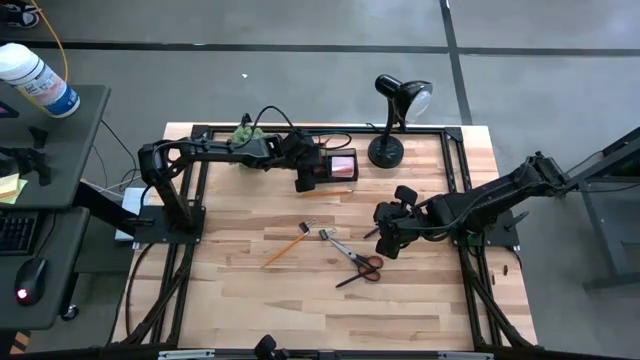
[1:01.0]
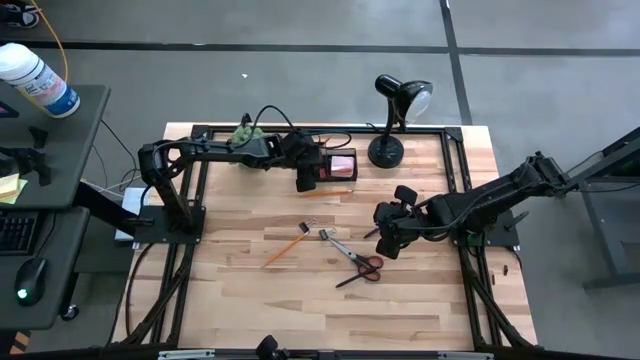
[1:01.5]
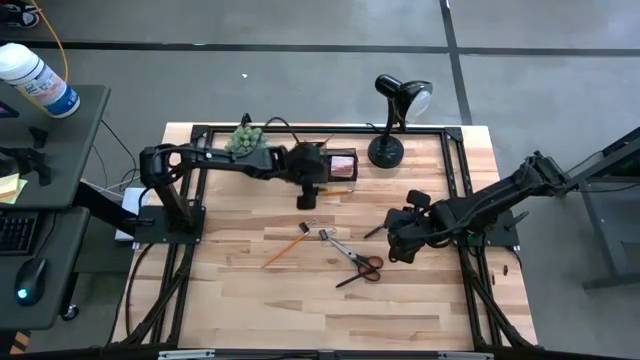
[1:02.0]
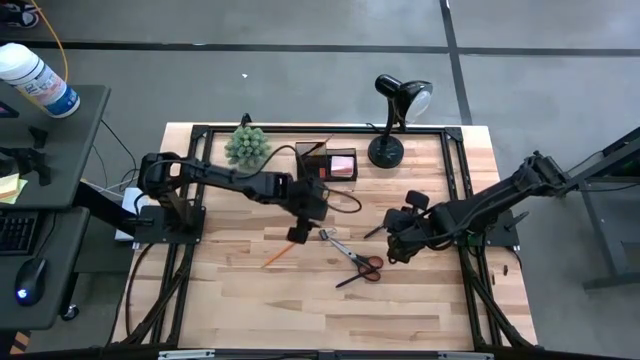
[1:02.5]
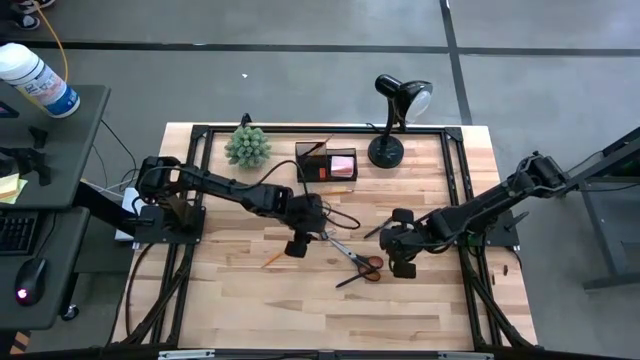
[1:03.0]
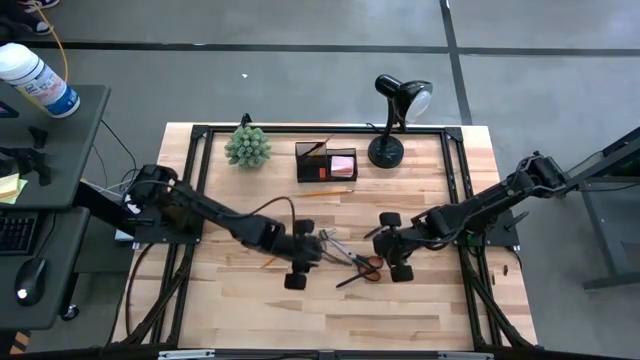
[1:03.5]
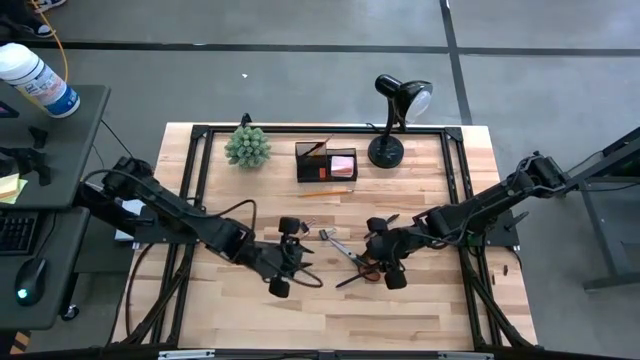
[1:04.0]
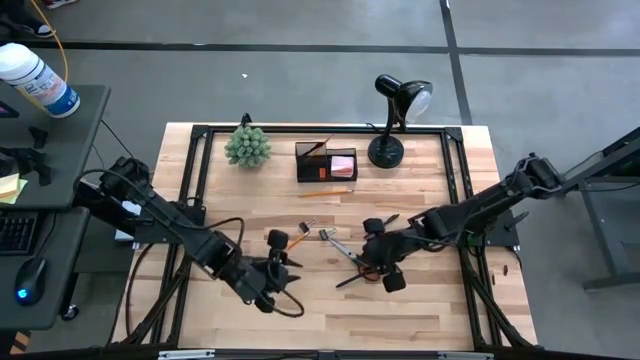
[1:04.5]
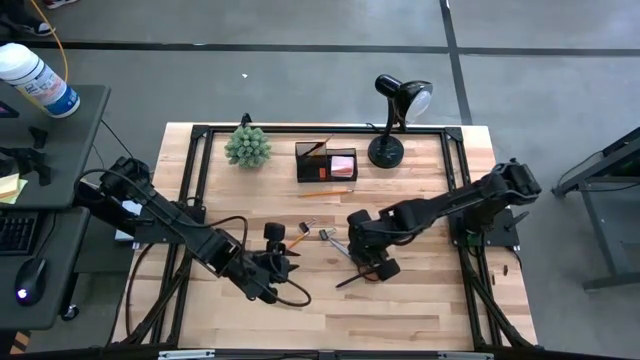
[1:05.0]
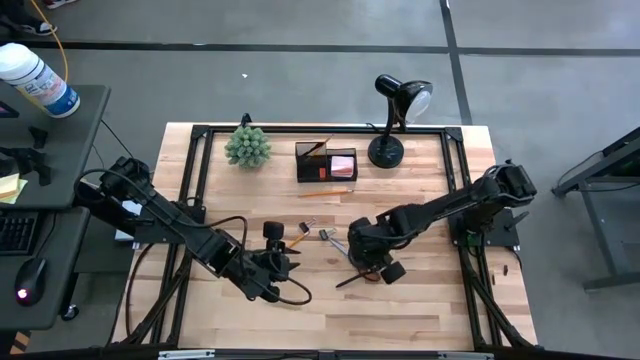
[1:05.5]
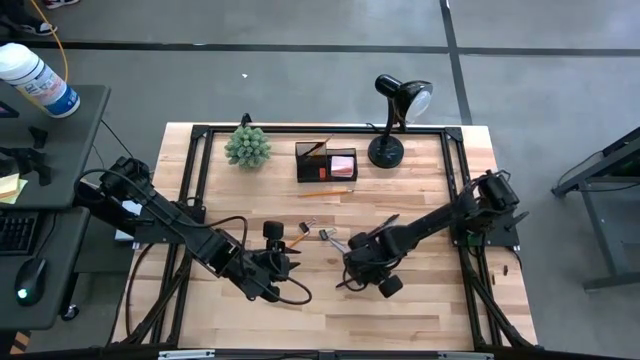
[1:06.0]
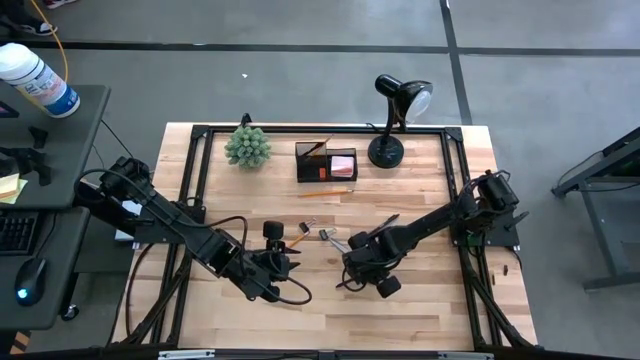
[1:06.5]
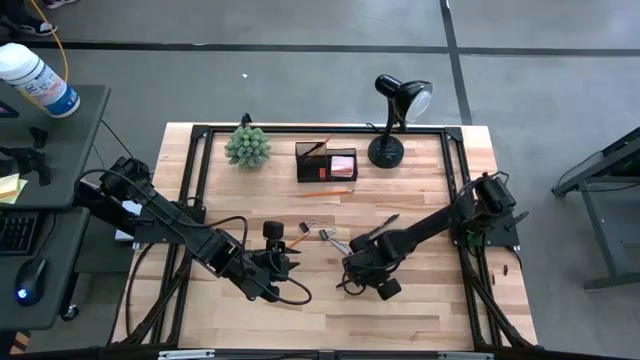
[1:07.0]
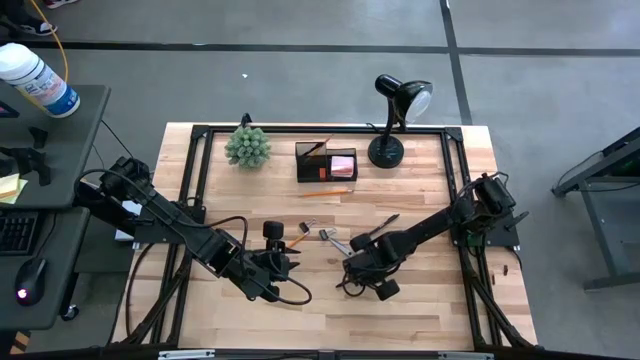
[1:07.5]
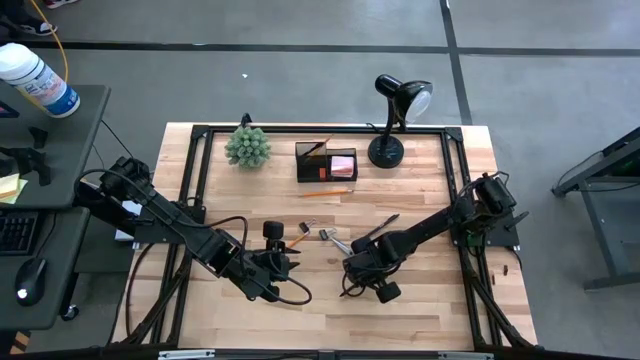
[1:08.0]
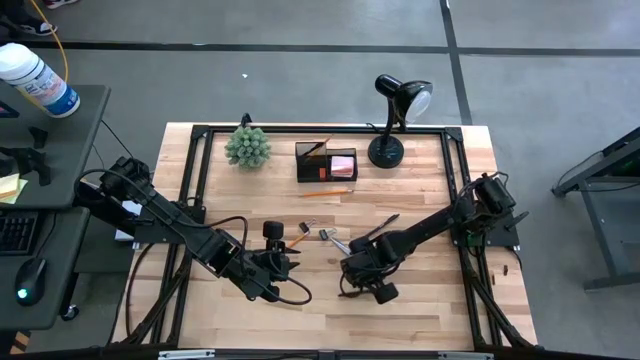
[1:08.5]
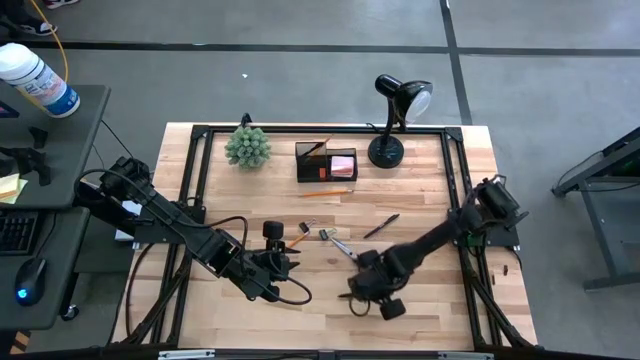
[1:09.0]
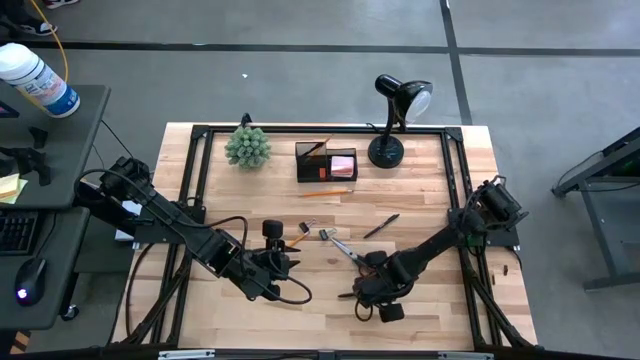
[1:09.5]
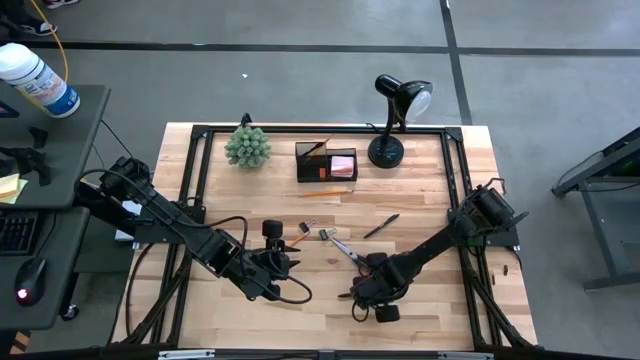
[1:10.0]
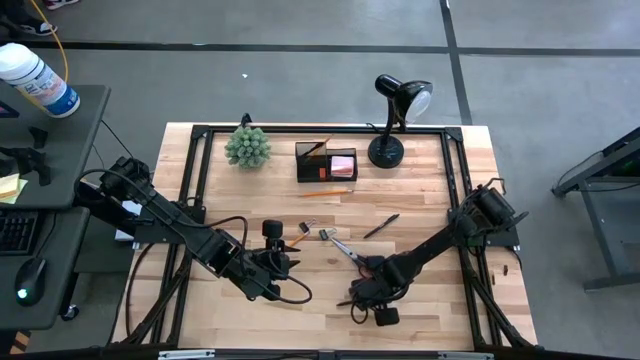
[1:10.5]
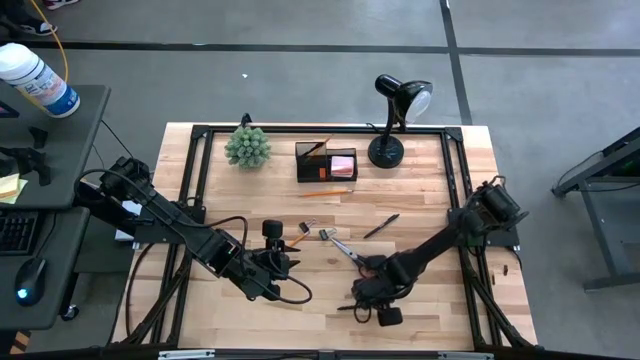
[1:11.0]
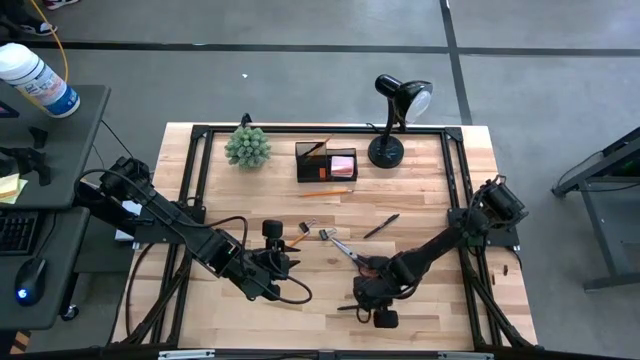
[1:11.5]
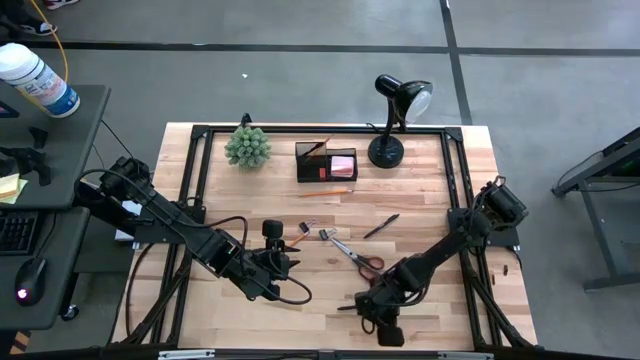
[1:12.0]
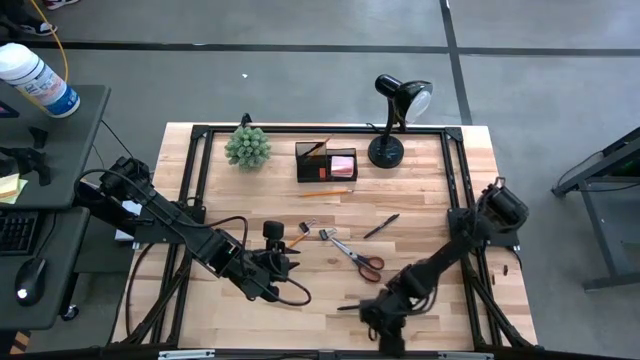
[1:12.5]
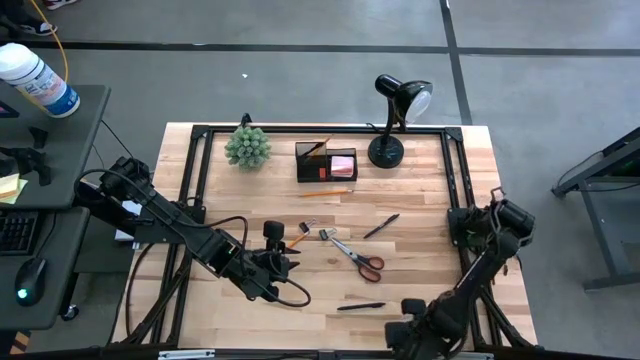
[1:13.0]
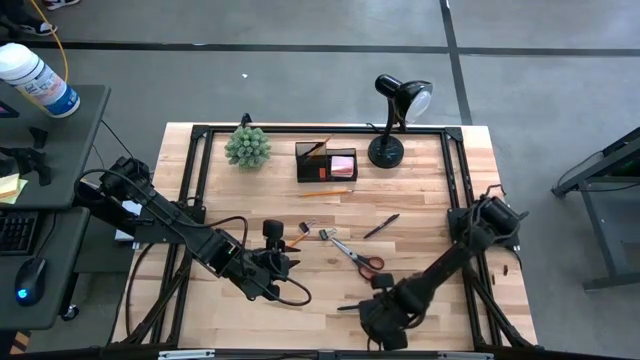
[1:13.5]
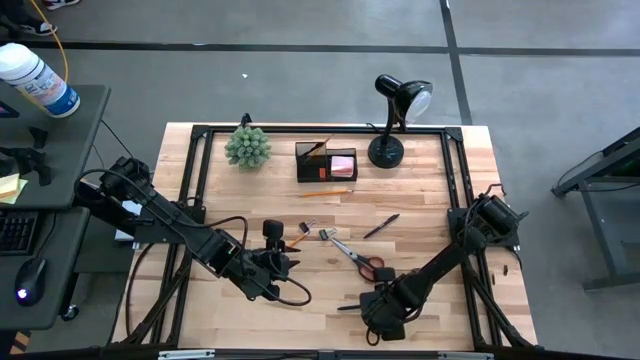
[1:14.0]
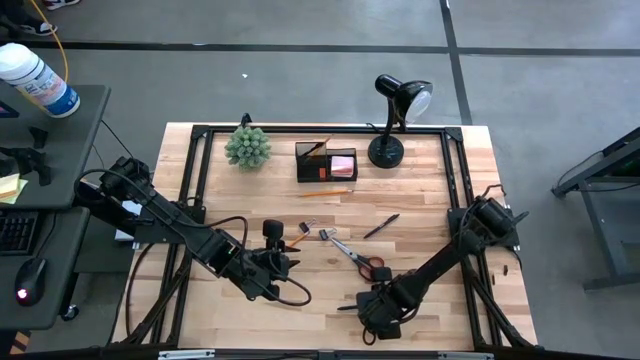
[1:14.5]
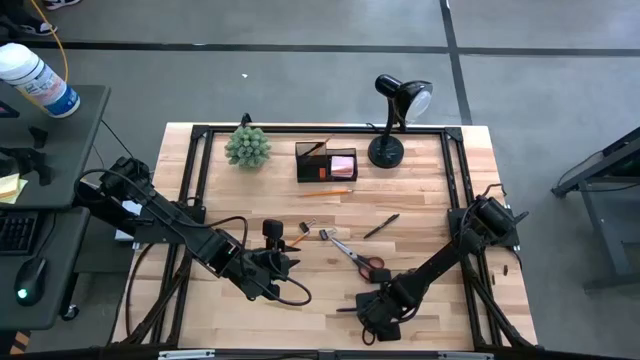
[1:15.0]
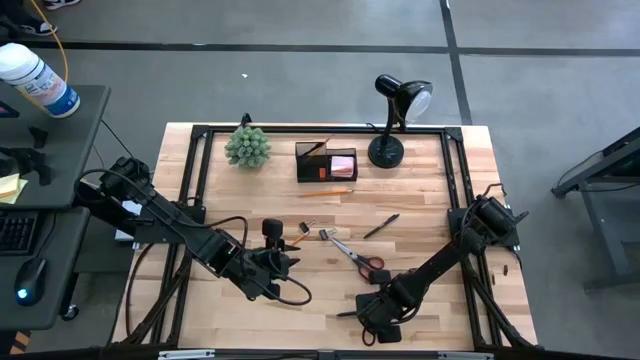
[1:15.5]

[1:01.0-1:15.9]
Task: Pick and place office supplies into organizer
Put the bottom black pen into the black desk organizer

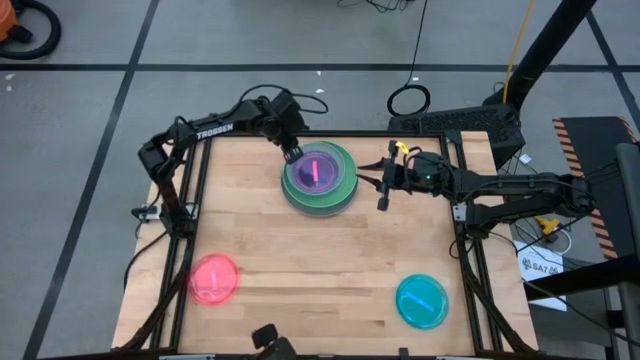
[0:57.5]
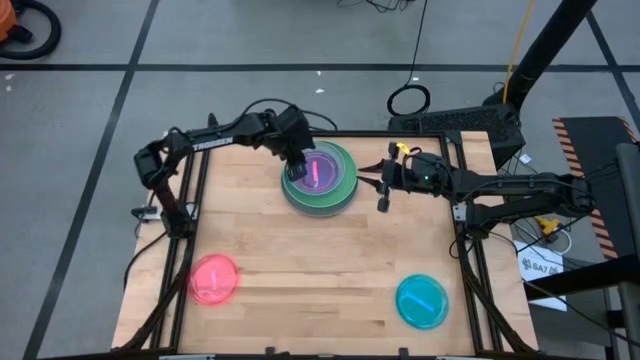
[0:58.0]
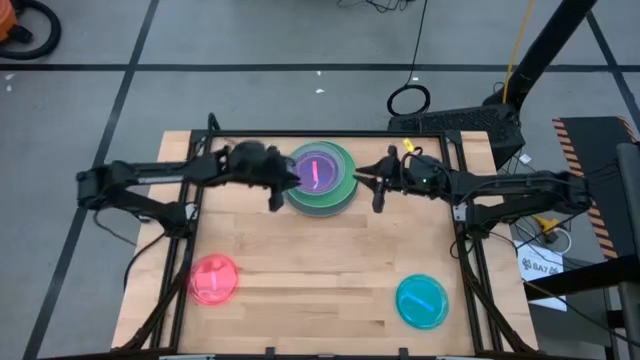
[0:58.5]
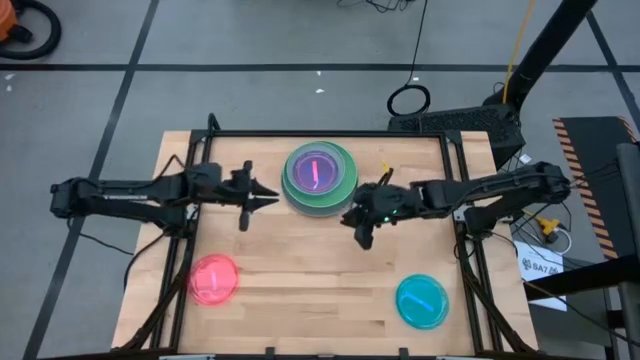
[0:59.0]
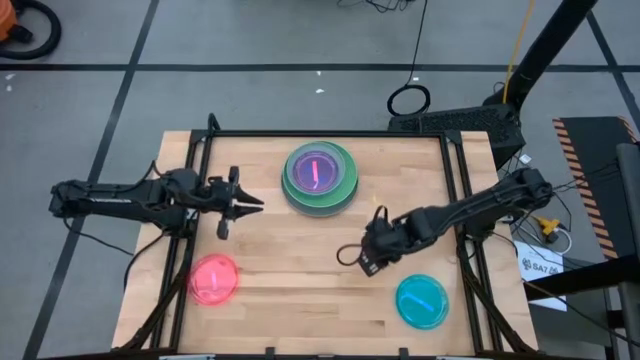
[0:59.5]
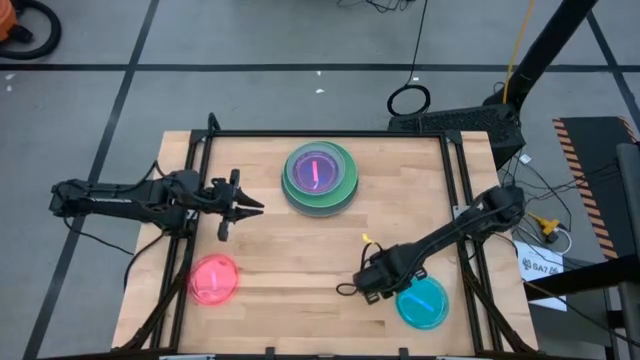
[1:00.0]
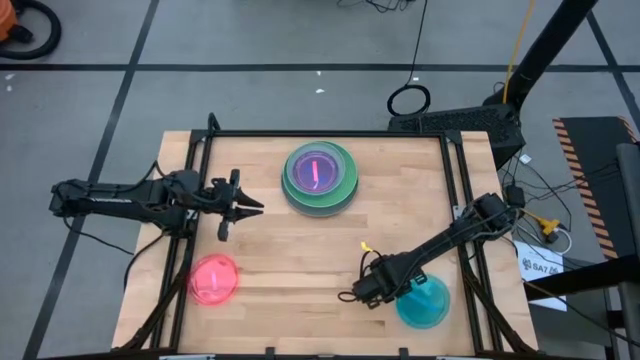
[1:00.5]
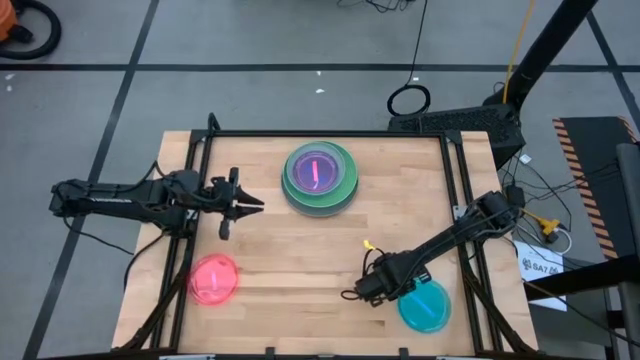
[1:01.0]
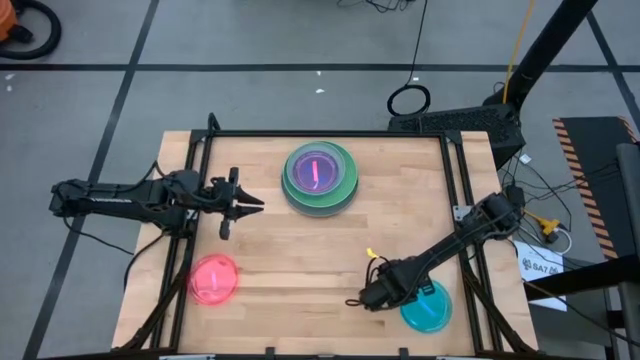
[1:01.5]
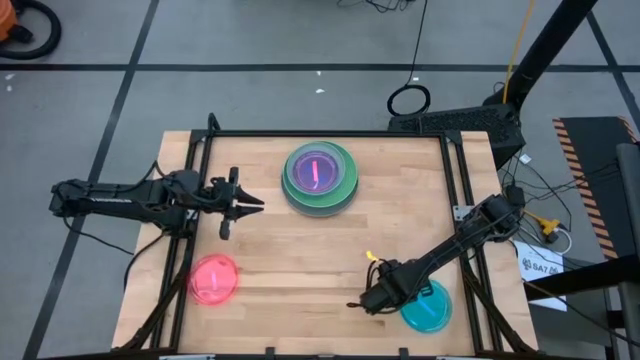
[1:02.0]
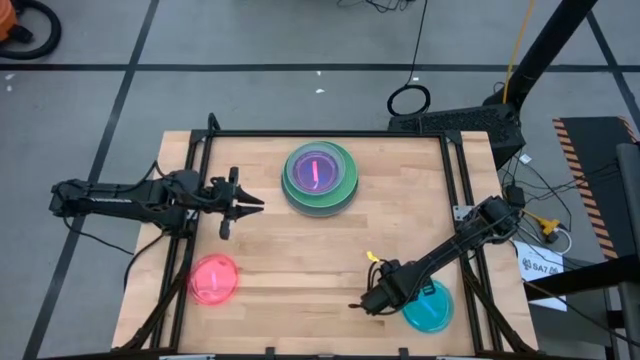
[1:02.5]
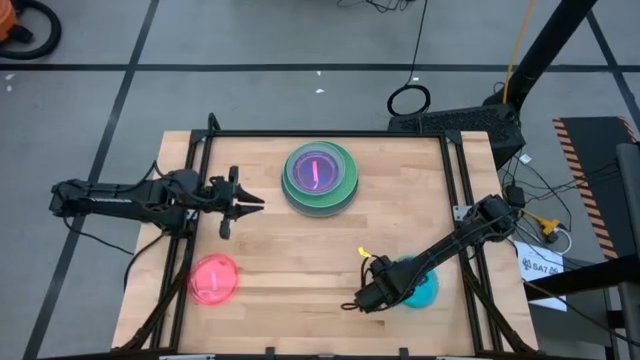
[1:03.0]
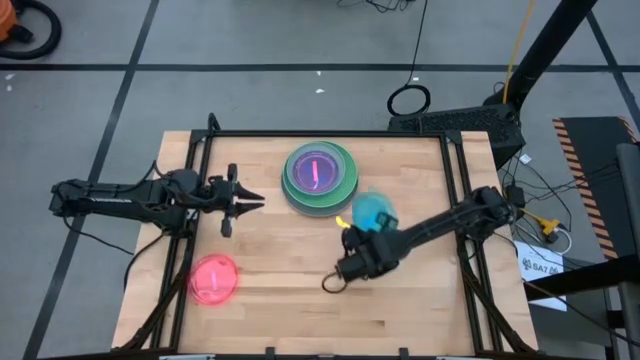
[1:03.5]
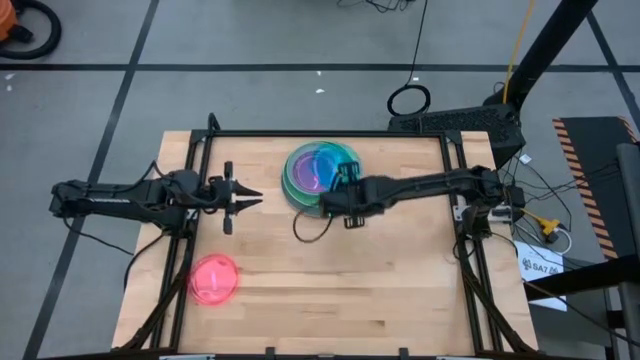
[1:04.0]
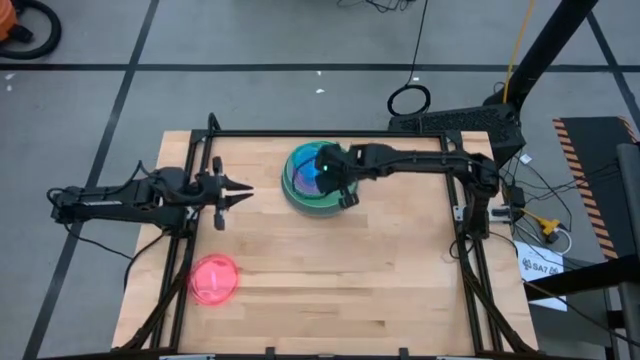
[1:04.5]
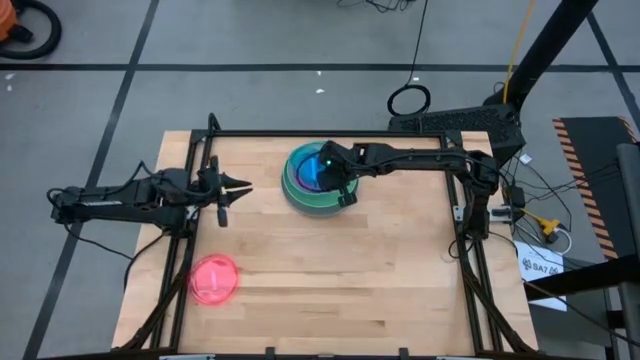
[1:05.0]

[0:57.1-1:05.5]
Task: Stack plastic plates
Stack the blue plate on the pink plate
